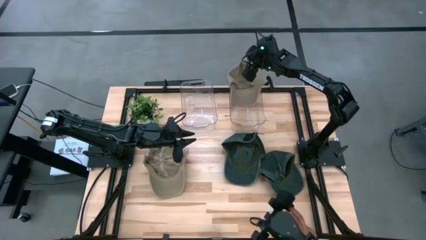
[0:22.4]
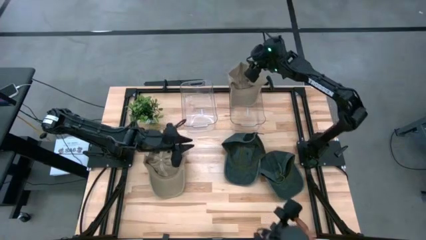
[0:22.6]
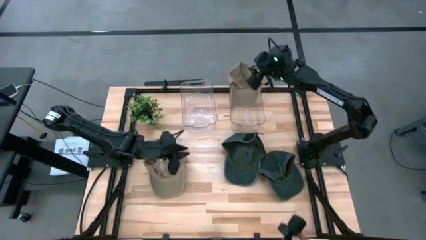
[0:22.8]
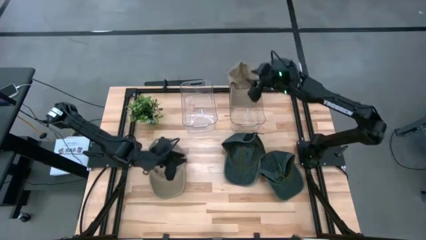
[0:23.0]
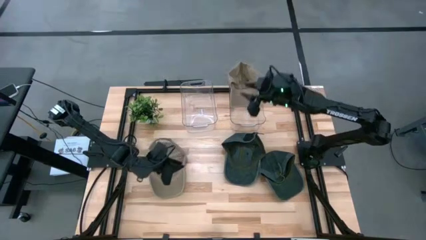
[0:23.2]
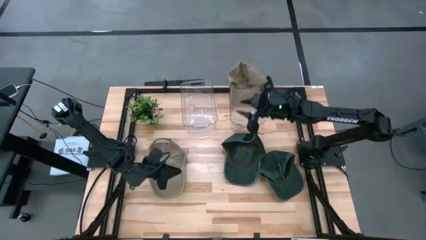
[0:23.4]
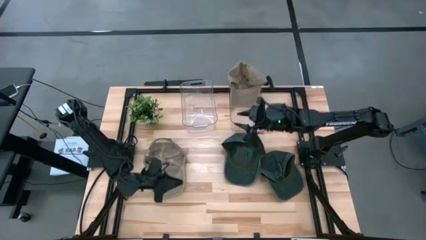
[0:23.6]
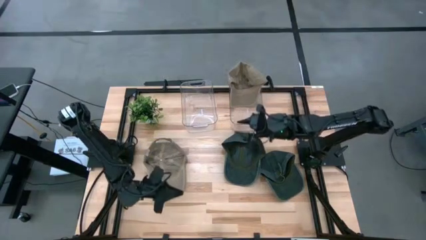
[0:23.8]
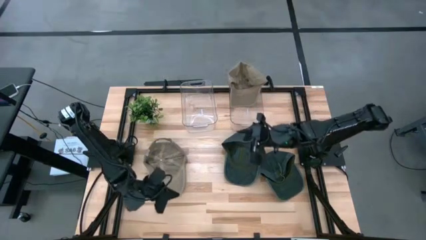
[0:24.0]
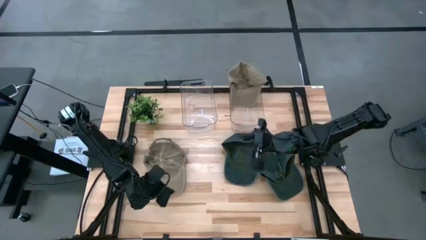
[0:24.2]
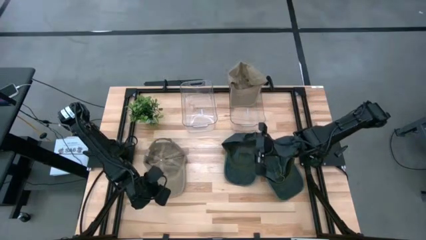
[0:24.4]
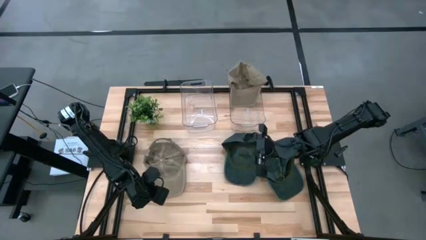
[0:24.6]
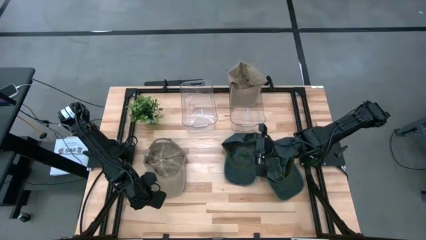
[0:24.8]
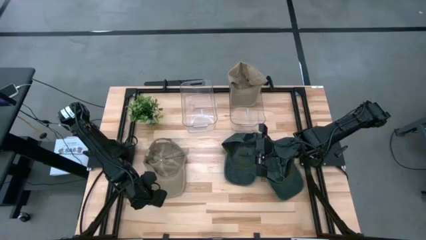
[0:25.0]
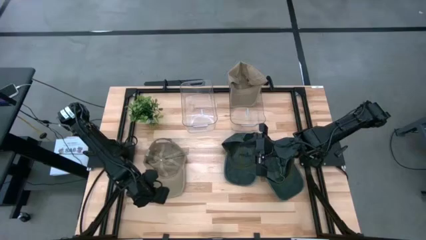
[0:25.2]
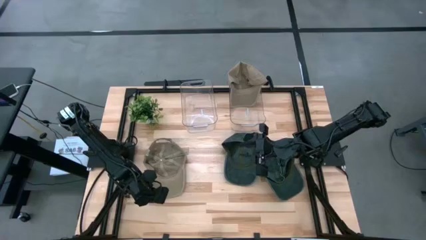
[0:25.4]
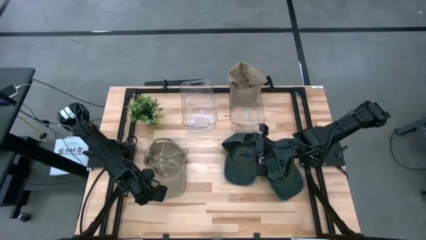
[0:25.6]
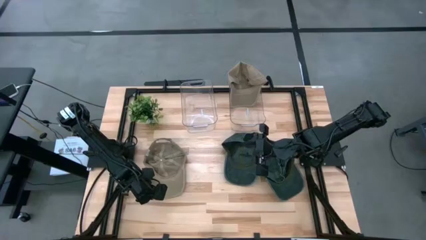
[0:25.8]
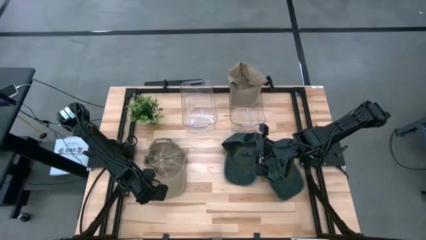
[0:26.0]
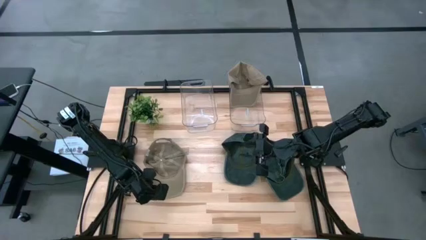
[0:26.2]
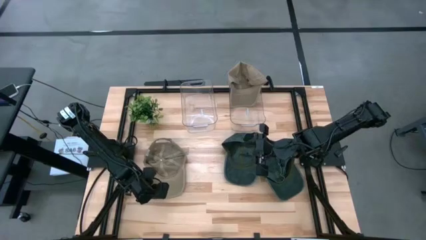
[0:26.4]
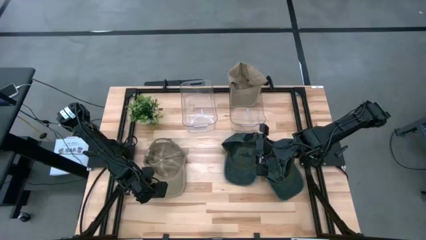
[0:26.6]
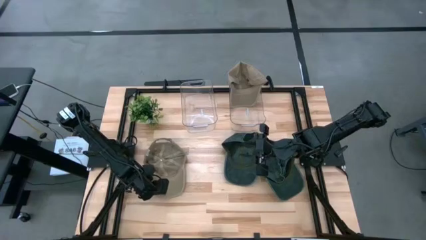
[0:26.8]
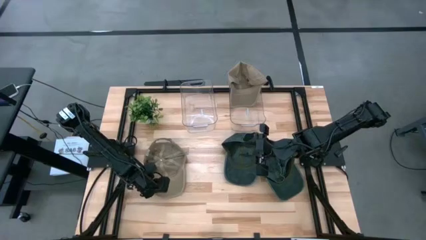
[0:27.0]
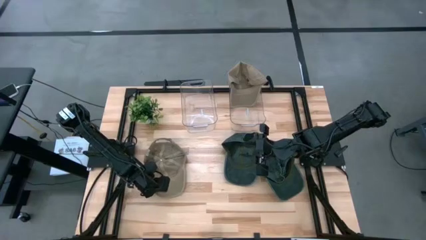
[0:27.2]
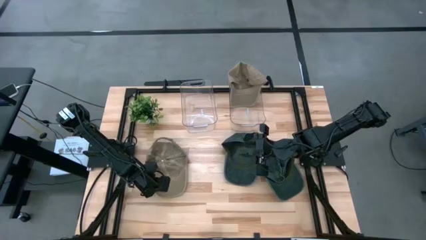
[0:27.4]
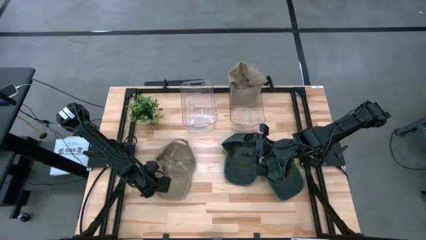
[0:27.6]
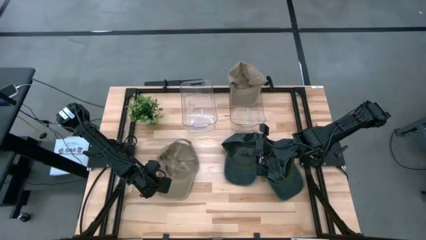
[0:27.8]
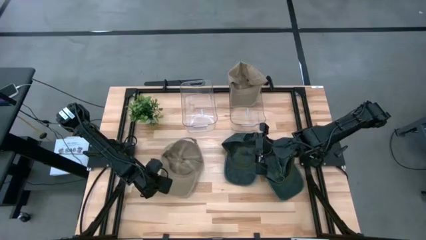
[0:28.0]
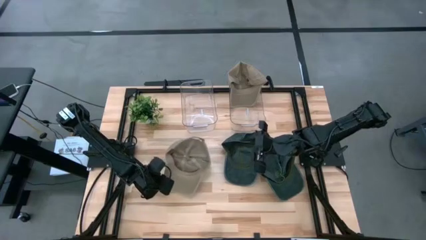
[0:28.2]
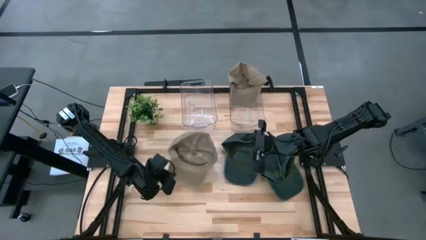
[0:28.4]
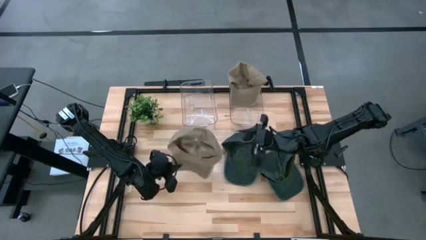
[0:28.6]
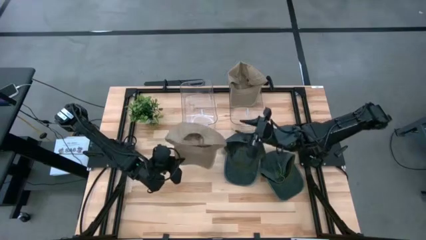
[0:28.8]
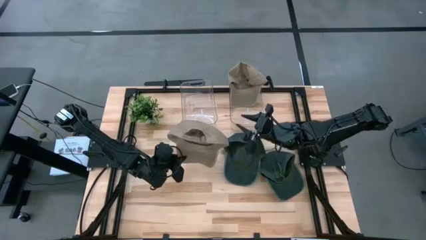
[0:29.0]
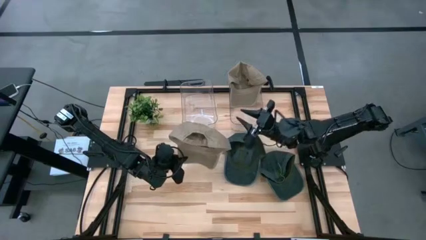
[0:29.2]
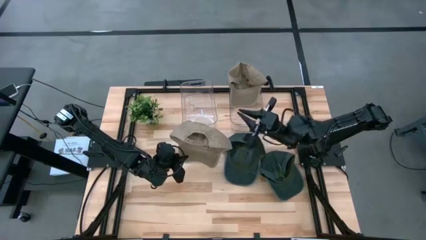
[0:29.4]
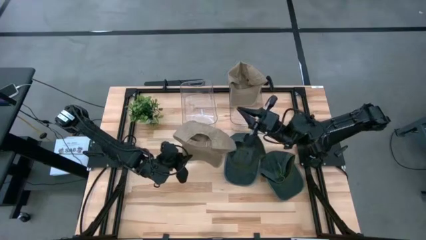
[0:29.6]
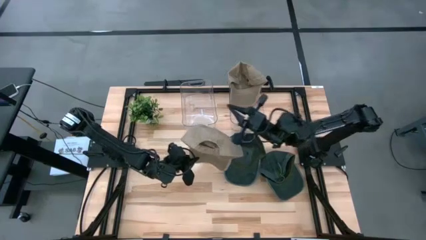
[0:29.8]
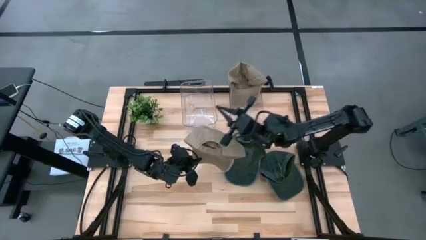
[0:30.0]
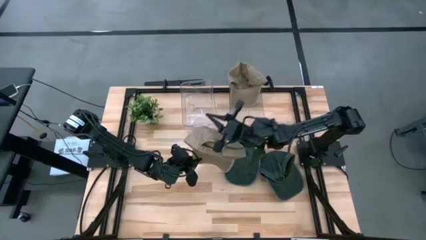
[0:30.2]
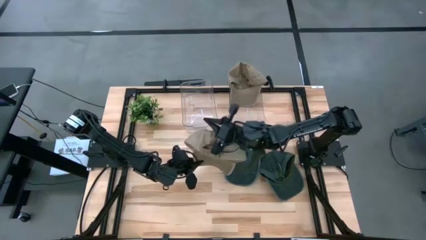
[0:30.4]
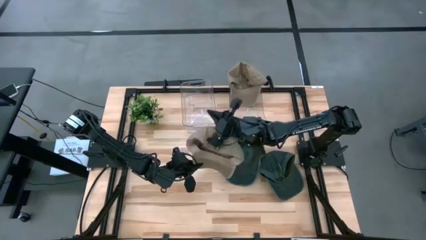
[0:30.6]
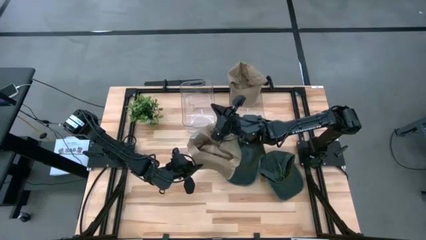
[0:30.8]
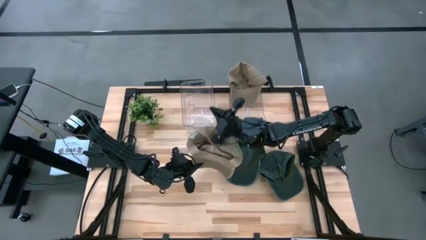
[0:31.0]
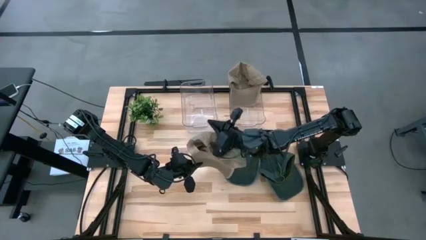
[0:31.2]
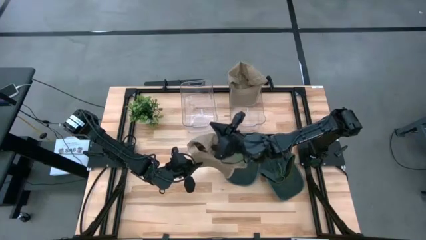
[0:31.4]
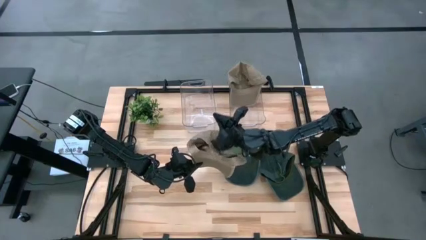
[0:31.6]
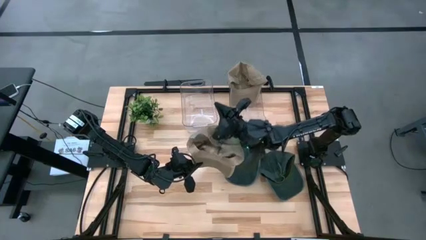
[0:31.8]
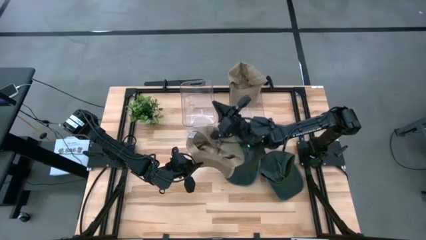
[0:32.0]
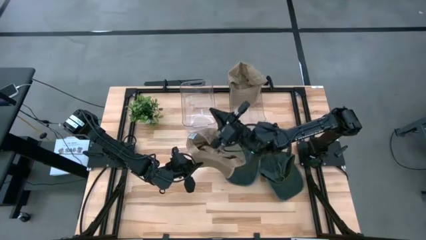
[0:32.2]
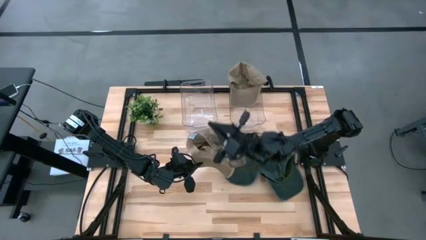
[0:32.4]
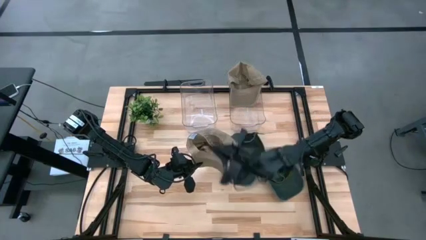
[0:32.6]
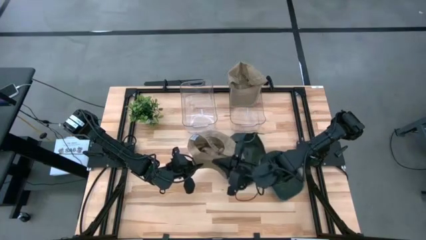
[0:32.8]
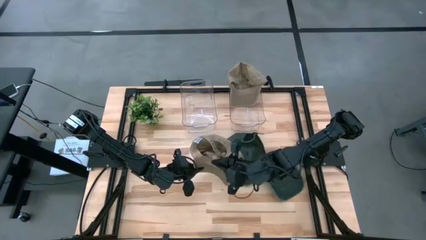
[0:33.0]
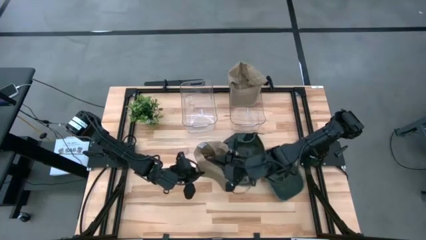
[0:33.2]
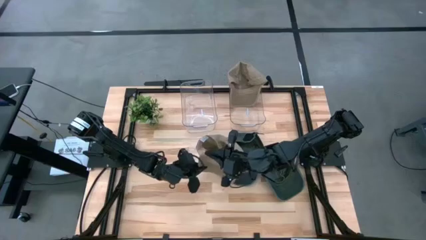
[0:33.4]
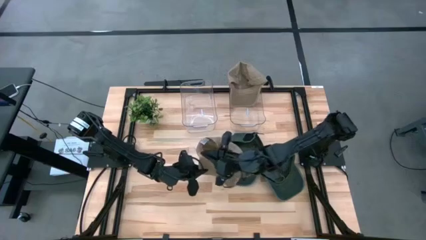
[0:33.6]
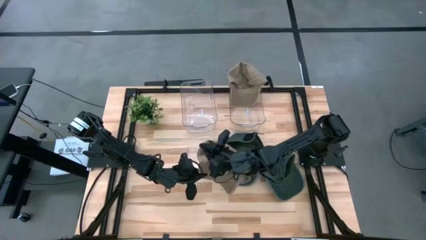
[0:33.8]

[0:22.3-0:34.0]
Task: Pick & Place hat
Put the brown cap into the right transparent bin
